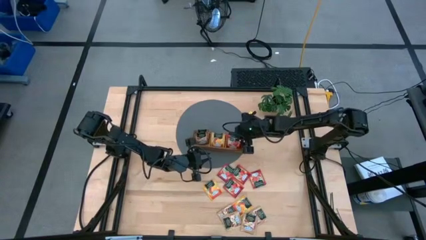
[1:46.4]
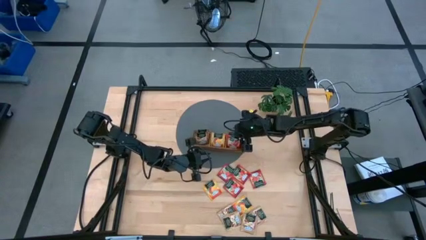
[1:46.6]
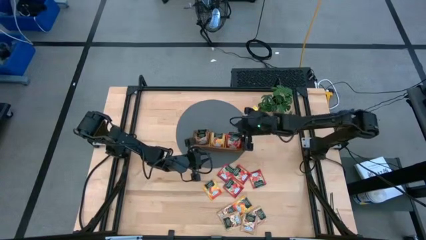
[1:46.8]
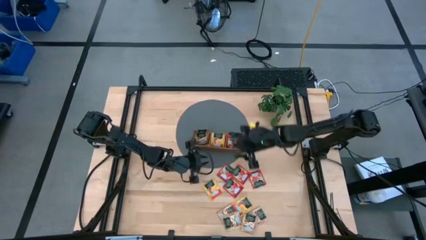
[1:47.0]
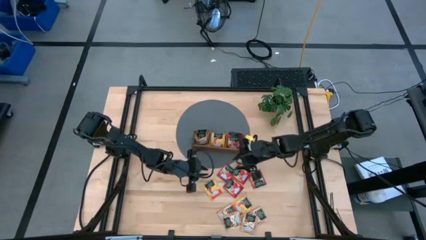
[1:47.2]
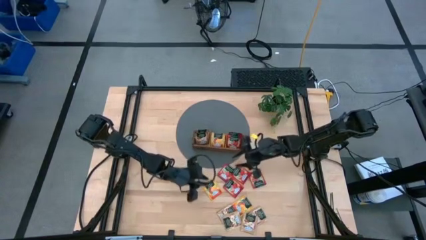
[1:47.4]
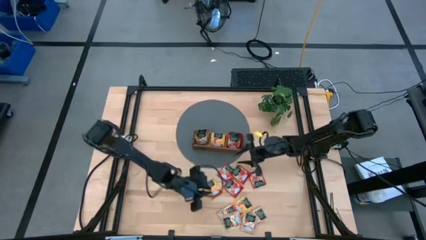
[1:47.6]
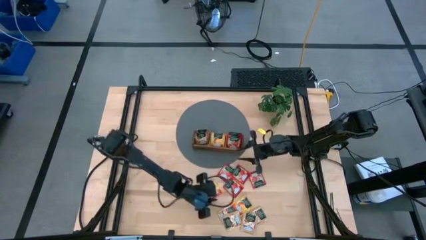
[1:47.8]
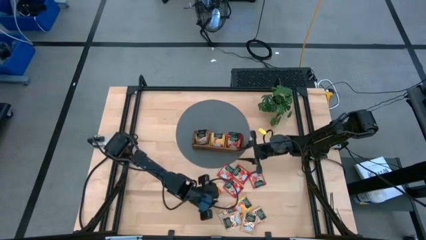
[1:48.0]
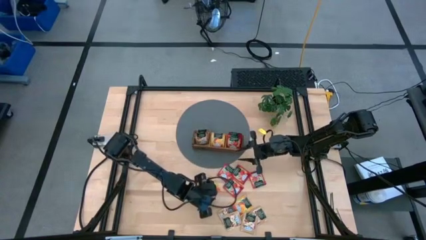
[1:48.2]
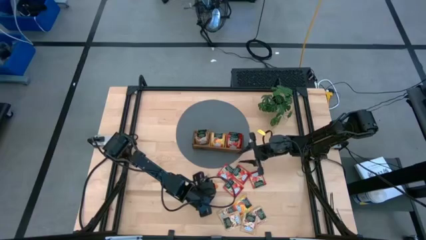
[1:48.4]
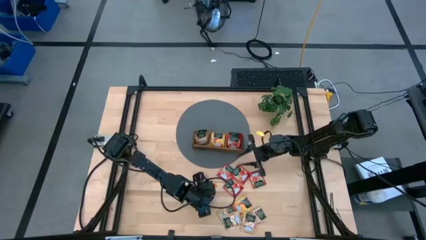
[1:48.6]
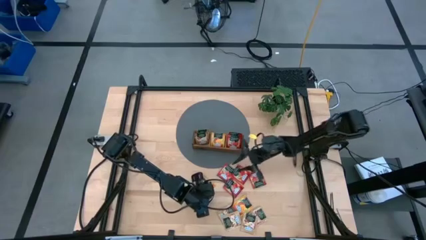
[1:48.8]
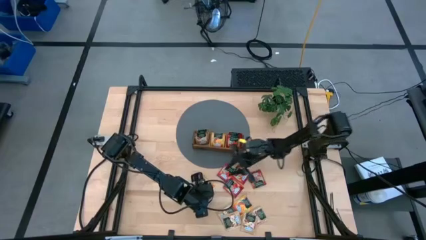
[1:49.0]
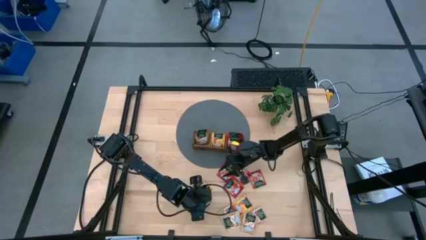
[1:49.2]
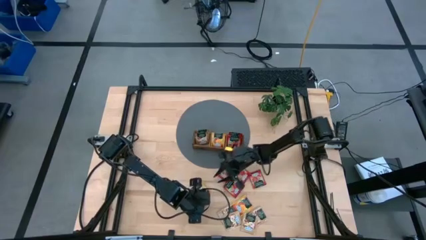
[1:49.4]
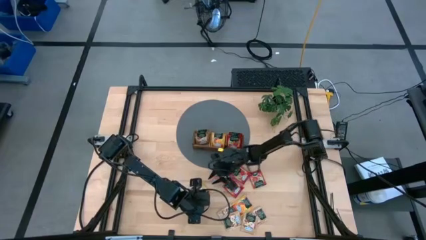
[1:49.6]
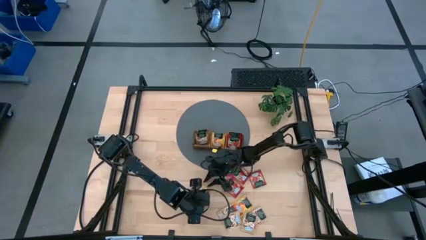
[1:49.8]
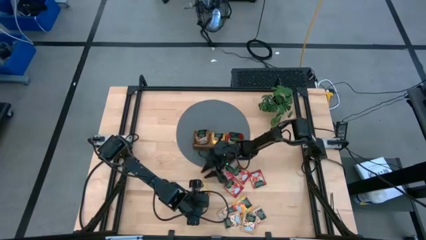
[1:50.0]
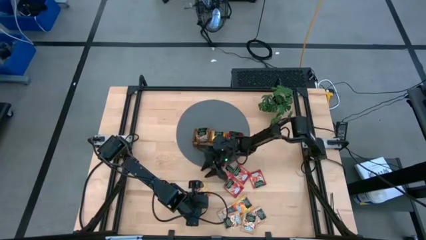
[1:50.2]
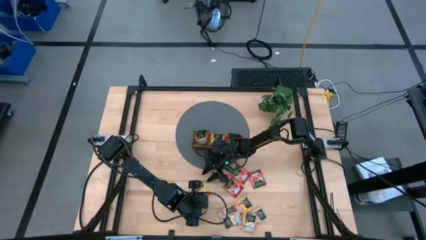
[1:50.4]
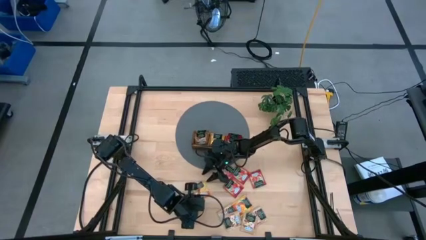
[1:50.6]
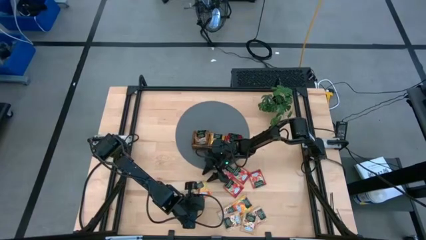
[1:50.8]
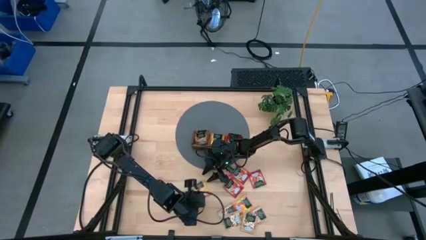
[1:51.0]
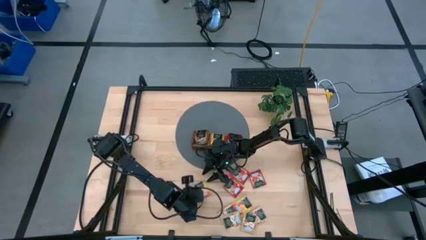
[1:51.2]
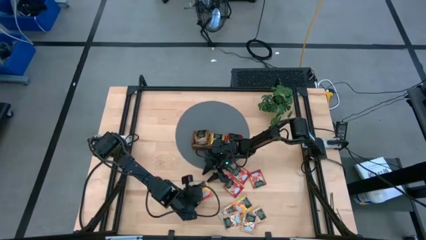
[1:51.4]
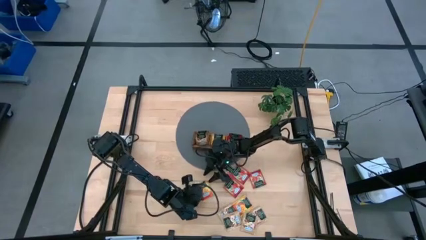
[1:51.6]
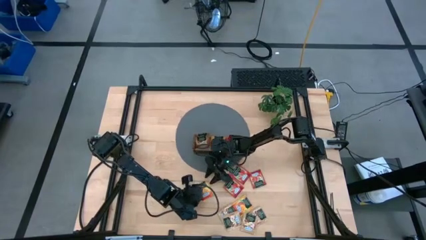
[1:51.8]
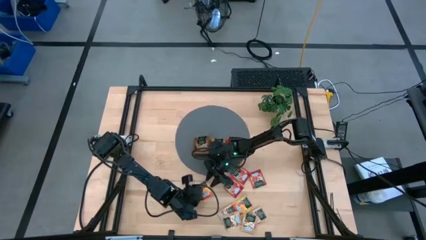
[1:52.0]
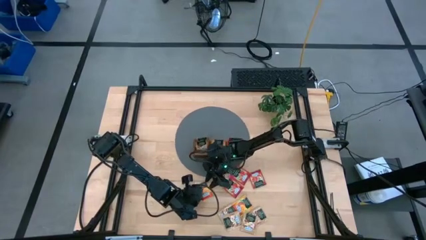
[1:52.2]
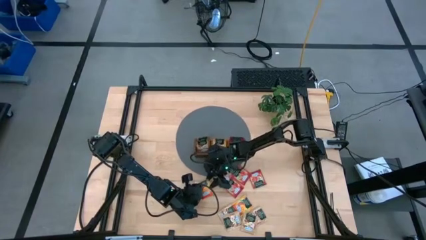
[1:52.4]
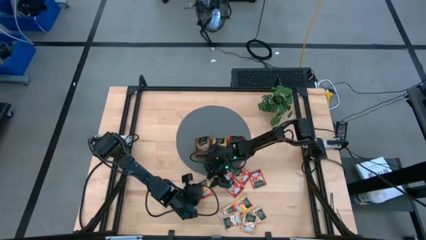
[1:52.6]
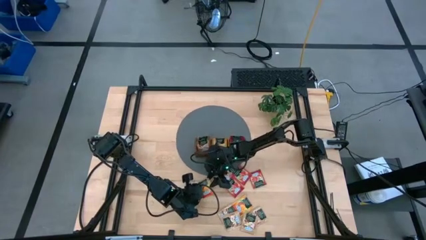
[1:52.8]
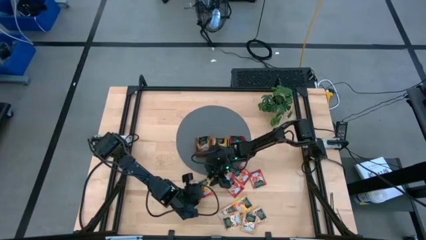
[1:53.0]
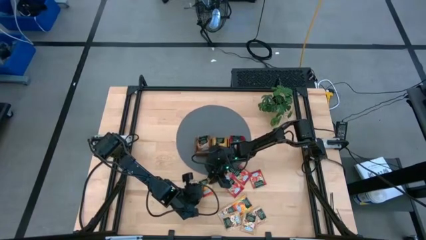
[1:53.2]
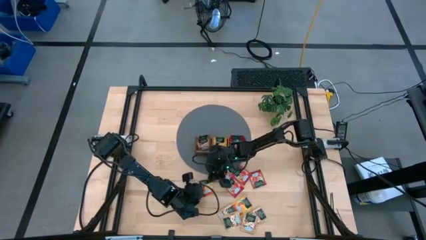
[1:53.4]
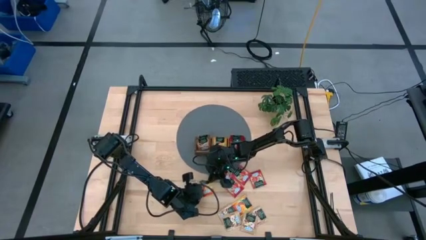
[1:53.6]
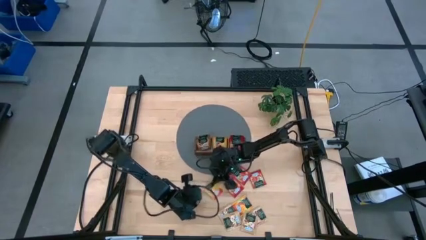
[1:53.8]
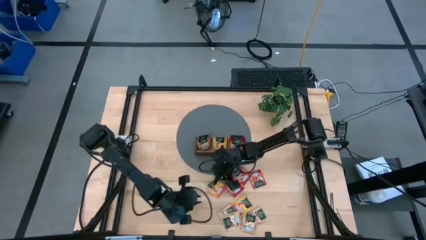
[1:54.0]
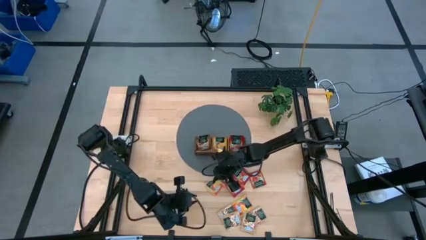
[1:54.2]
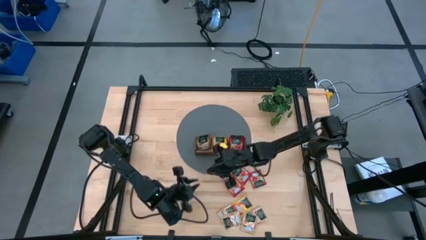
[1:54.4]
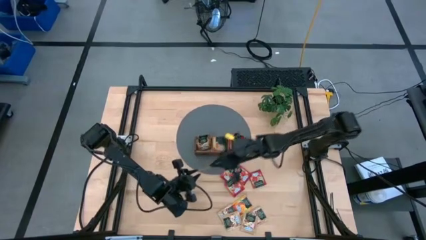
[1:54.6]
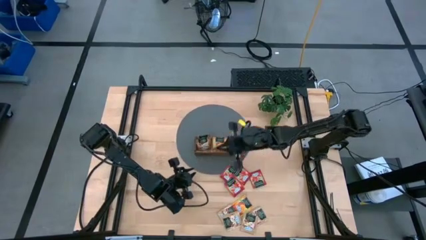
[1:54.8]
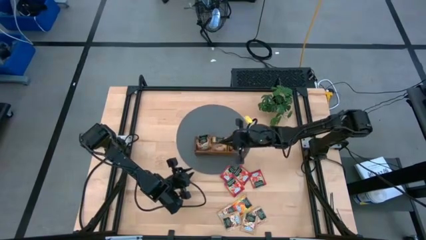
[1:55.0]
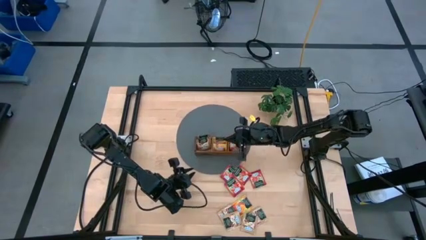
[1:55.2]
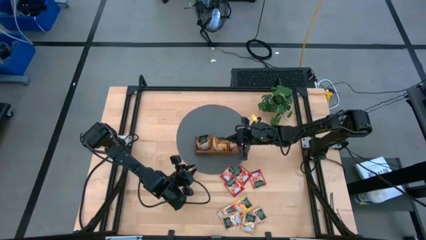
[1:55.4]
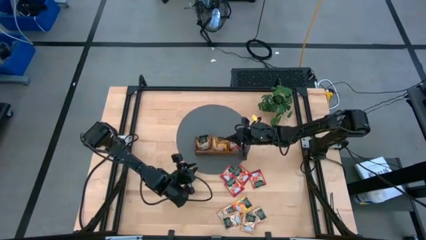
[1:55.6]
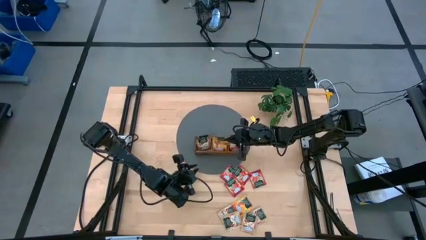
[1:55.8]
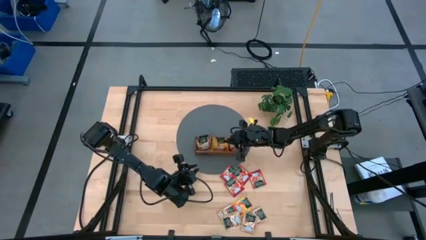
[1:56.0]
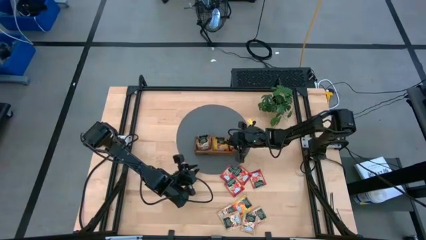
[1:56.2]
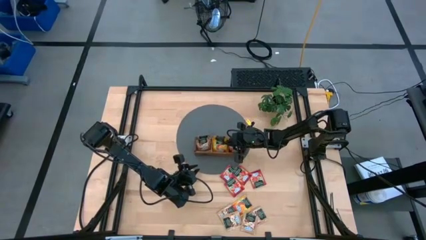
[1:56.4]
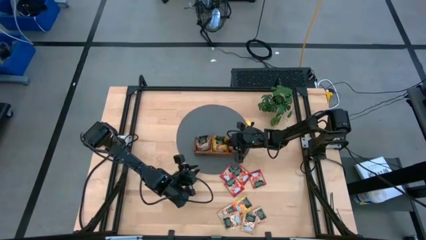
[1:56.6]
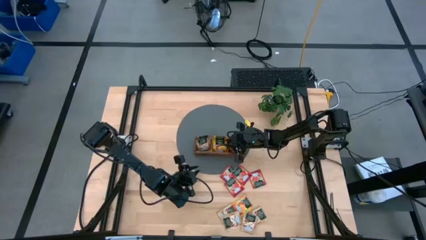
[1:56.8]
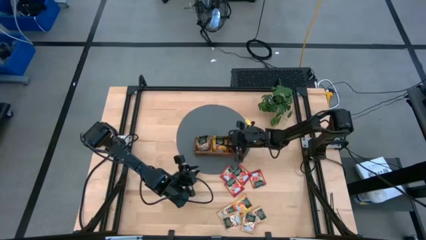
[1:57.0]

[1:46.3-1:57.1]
Task: Pick & Place Tea
Put the yellow tea bag into the middle section of the wooden organizer

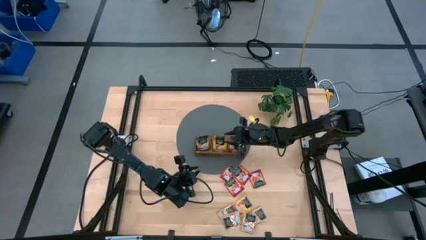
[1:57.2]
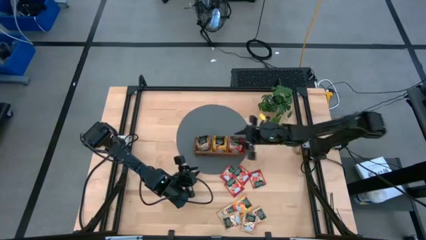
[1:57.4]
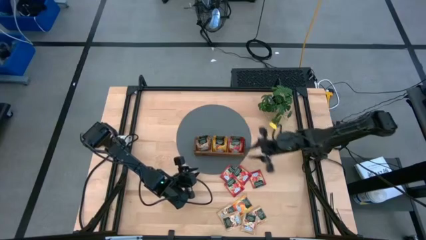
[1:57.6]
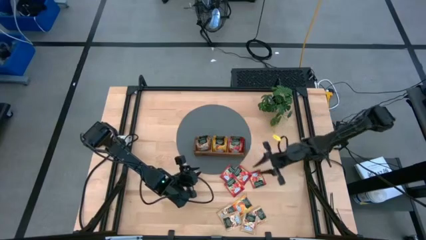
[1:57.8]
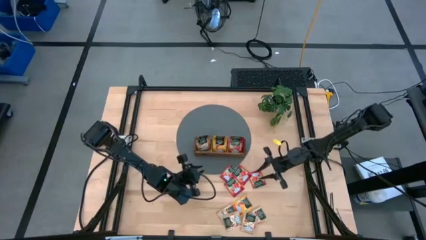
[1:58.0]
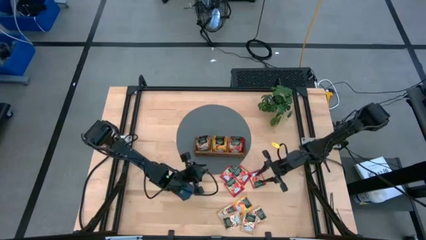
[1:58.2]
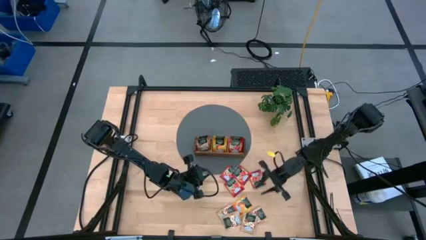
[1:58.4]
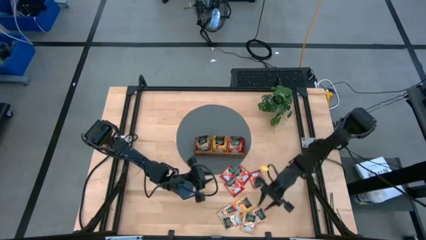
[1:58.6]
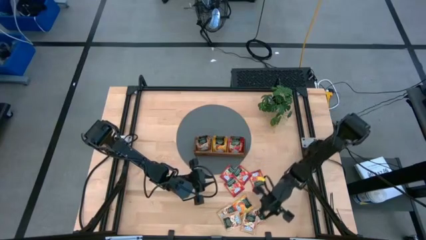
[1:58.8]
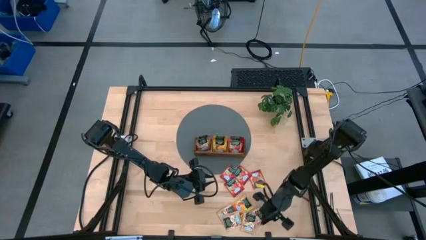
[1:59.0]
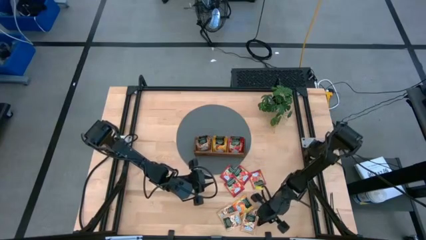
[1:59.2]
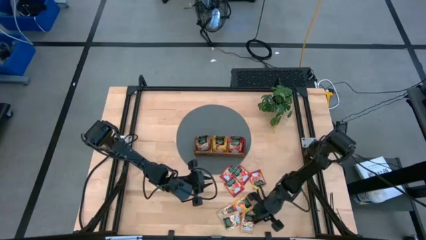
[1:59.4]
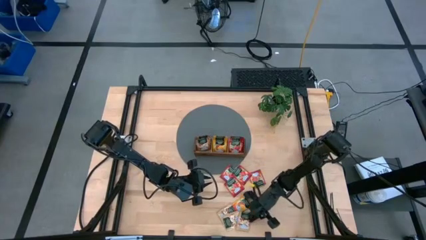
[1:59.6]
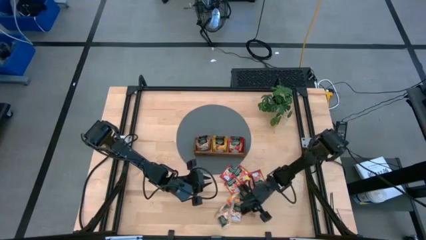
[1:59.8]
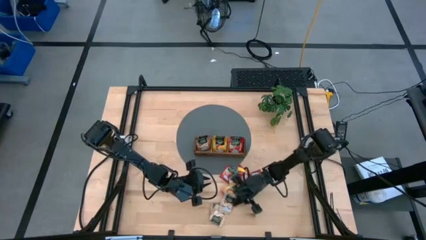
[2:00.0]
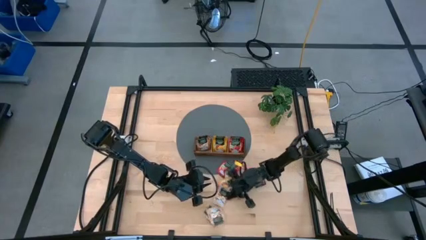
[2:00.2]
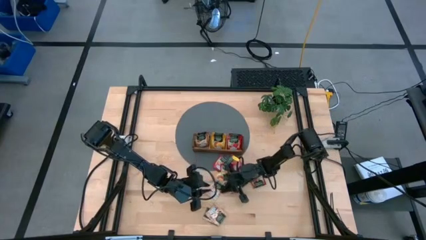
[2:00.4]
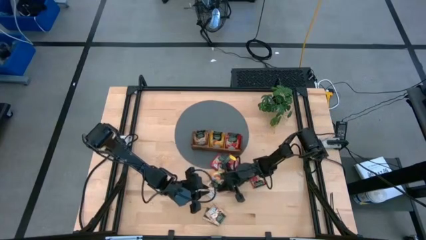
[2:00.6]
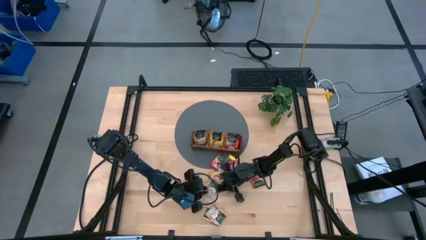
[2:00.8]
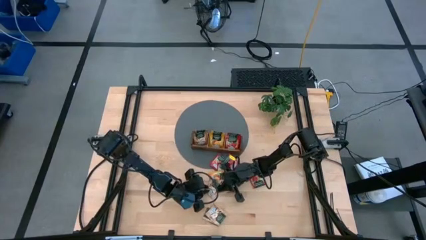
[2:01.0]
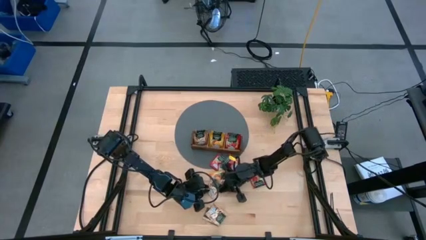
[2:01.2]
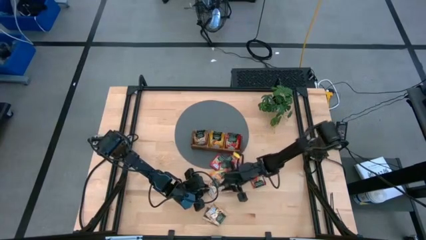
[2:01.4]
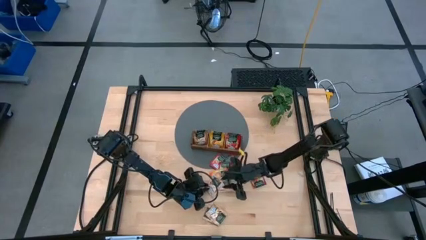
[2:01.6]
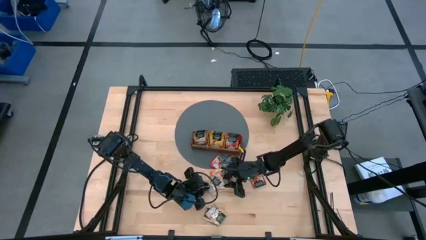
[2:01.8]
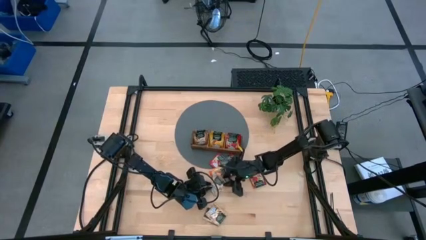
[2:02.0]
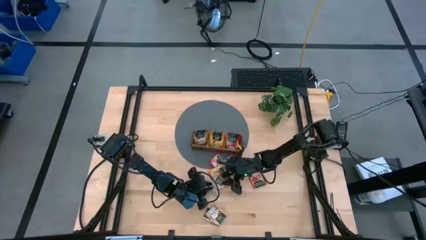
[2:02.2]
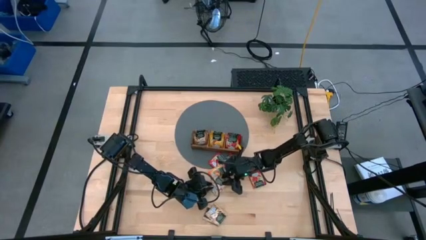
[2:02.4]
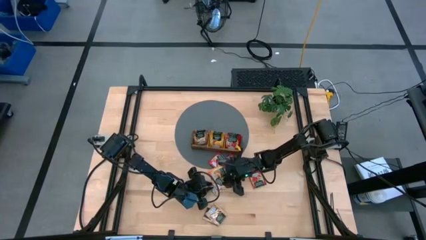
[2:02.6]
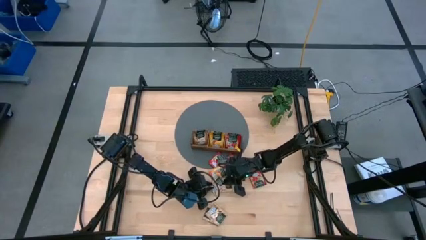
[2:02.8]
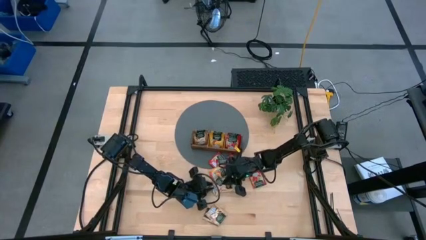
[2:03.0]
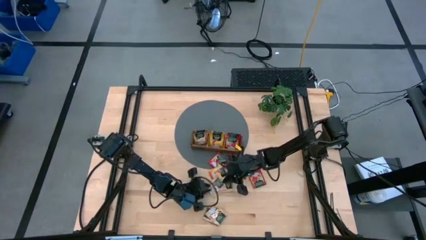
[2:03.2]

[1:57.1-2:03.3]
Put the brown tea bag into the left section of the wooden organizer
